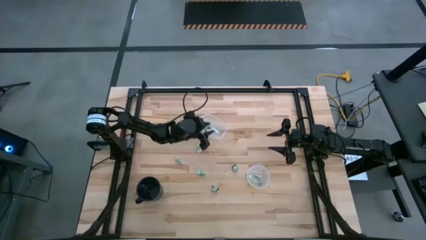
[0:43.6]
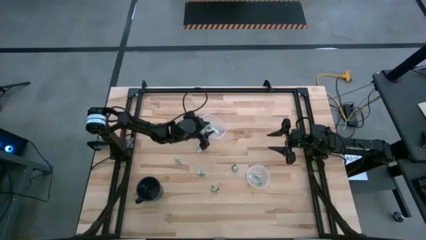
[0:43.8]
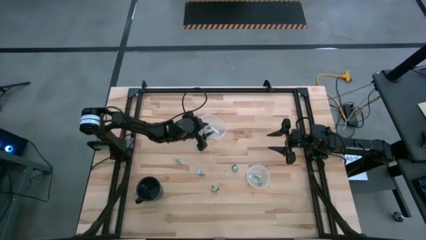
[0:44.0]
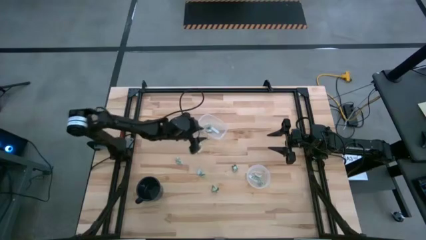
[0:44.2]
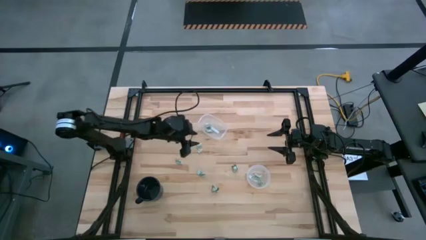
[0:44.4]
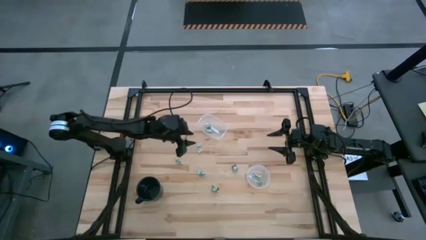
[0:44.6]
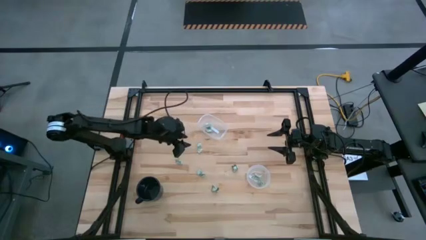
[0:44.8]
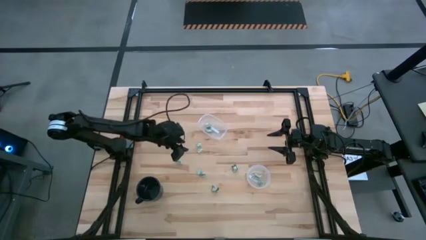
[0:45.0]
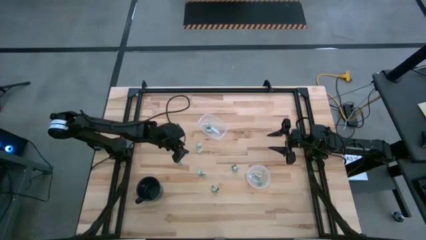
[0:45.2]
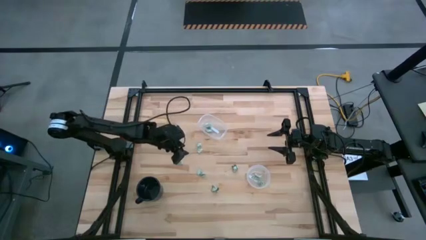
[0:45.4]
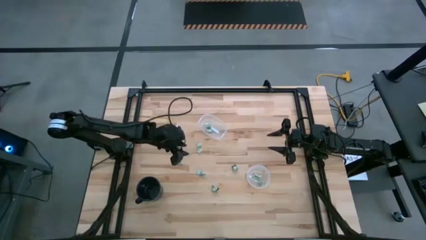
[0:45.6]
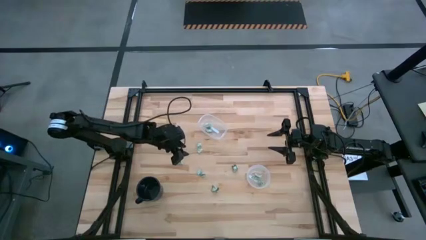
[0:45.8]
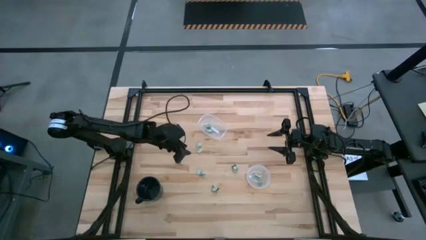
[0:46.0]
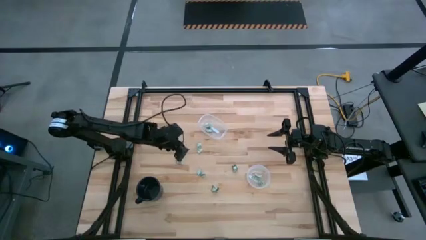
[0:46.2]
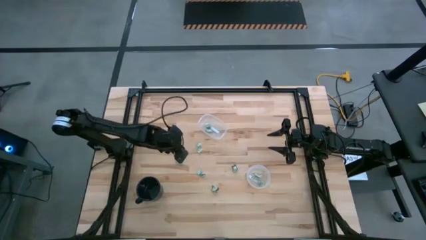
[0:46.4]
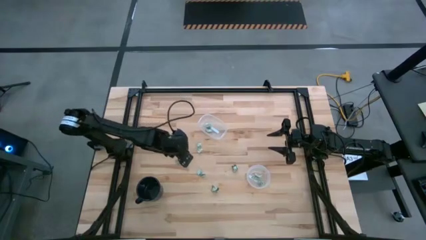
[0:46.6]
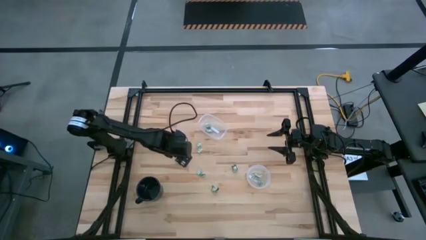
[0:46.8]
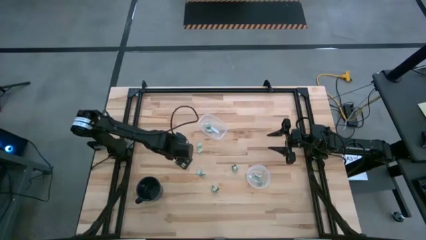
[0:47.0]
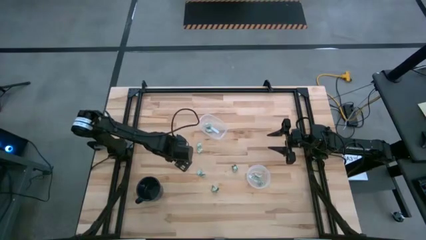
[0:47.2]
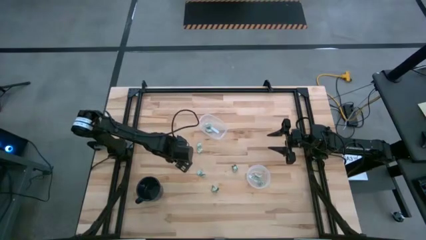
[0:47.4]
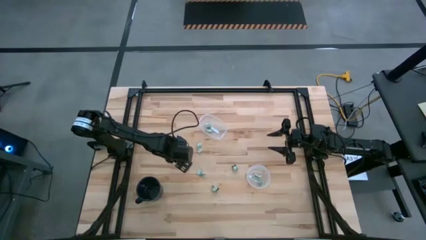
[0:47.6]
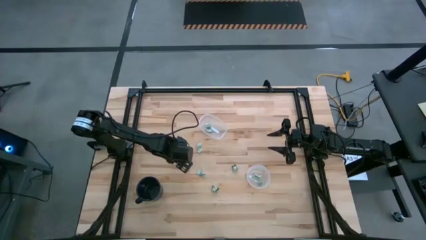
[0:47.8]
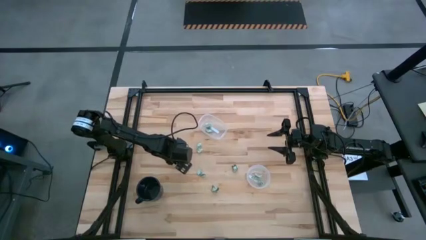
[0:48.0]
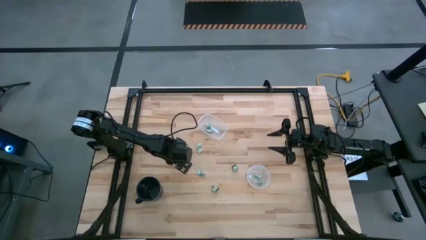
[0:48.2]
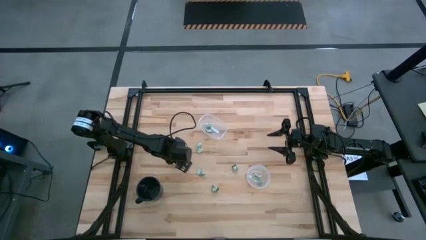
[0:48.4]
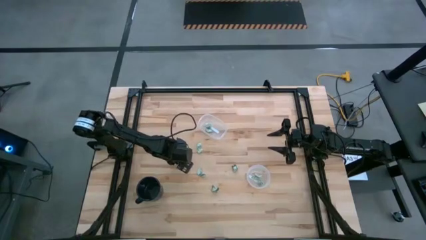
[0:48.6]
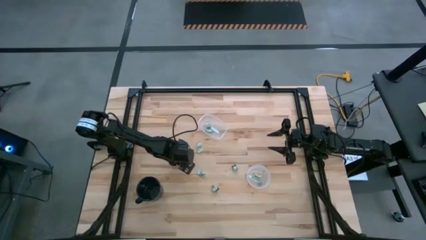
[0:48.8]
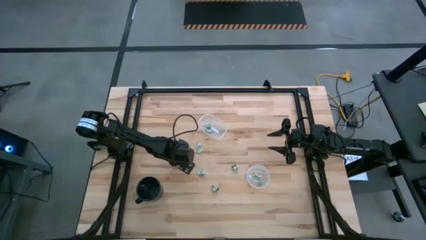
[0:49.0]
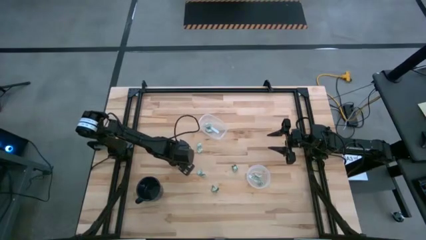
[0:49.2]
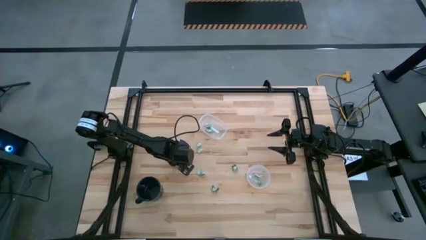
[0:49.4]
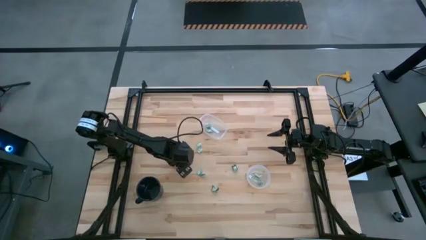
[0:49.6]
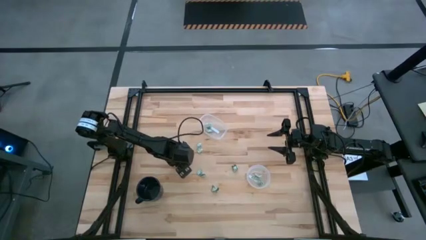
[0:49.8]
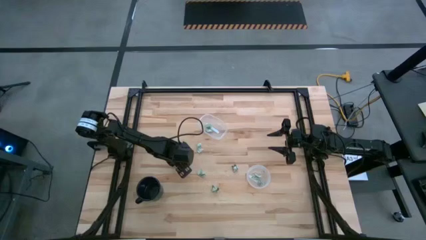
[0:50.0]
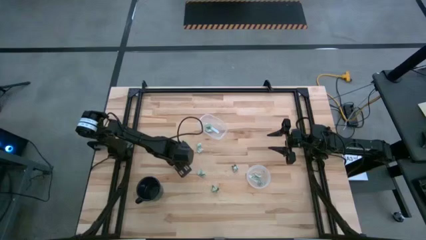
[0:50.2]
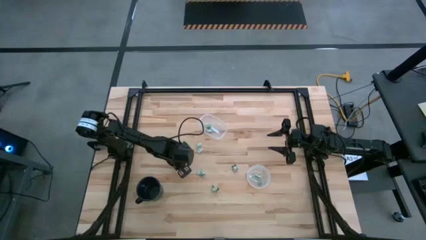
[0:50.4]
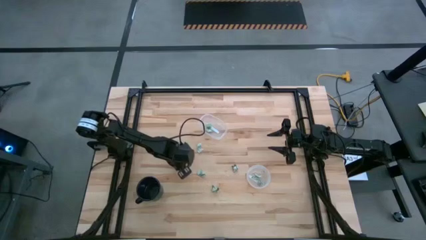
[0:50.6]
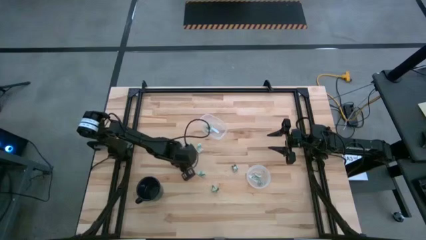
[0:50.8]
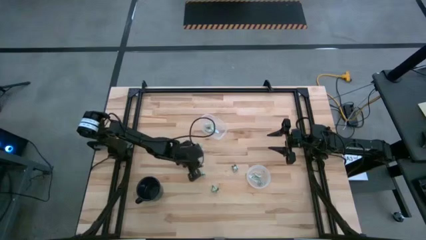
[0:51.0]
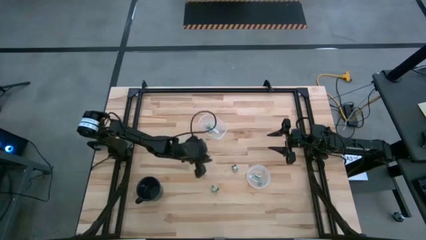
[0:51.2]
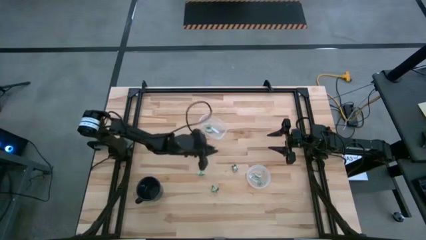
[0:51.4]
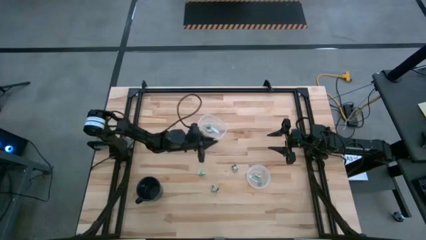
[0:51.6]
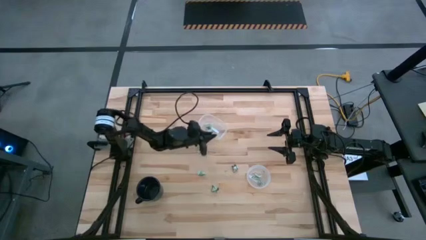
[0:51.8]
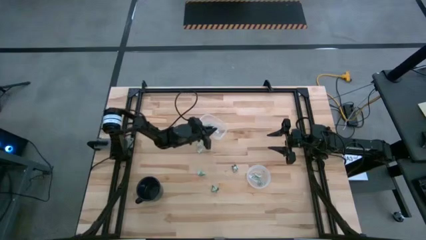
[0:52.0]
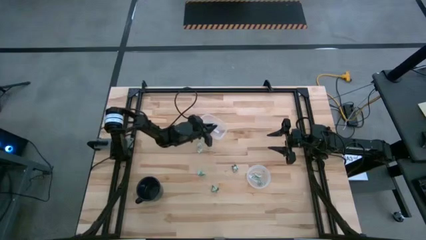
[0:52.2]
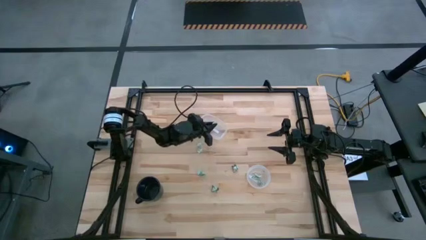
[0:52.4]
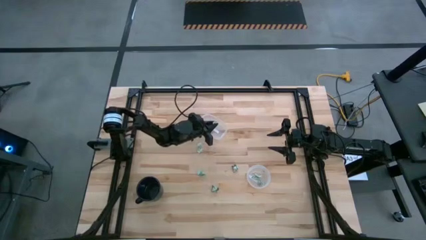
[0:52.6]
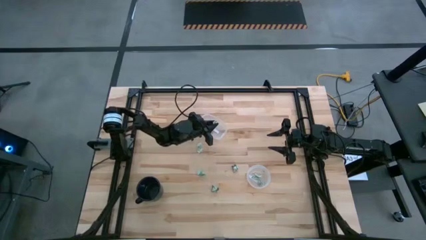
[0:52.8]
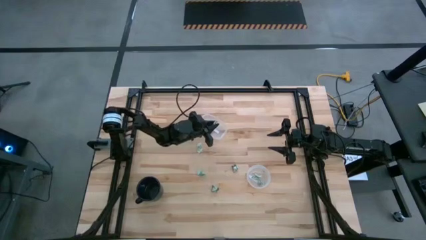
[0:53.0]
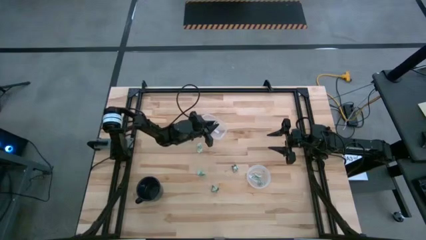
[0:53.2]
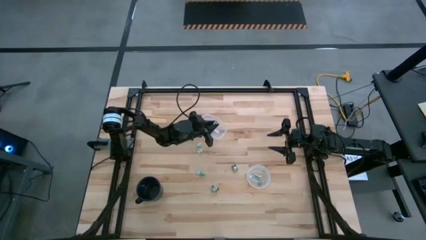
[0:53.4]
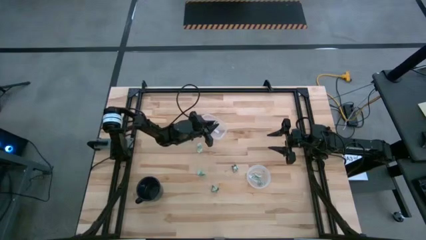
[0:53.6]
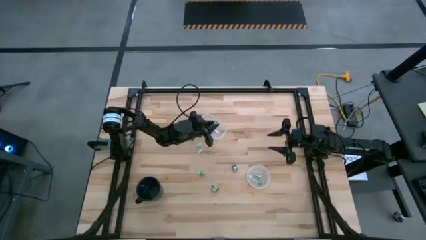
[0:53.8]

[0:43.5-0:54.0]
Task: Pick and place Stevia / Truvia into bins
Put the stevia packet into the oval transparent container

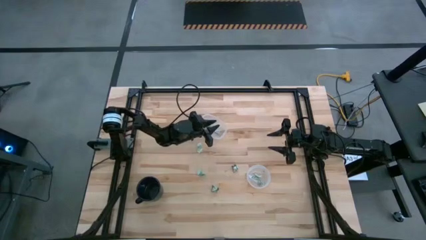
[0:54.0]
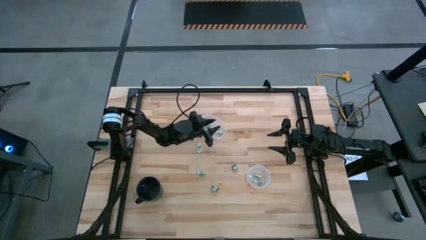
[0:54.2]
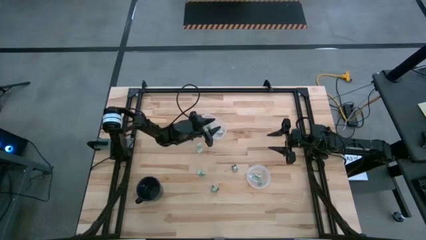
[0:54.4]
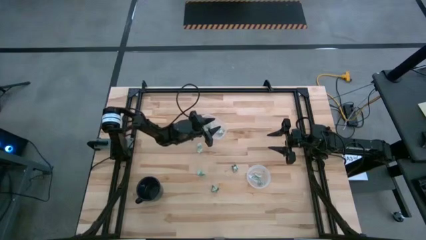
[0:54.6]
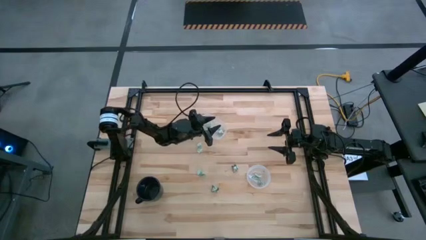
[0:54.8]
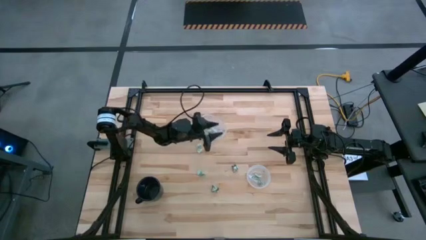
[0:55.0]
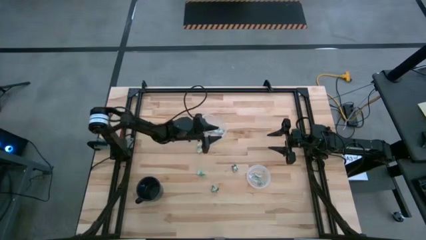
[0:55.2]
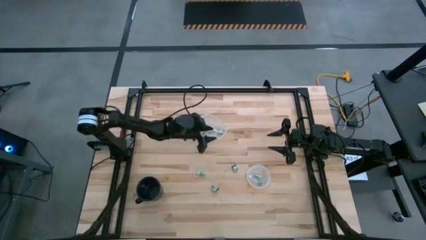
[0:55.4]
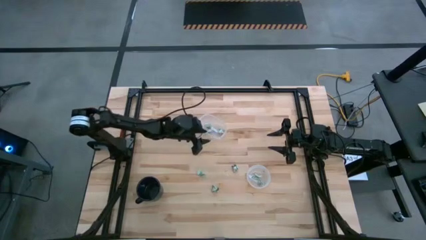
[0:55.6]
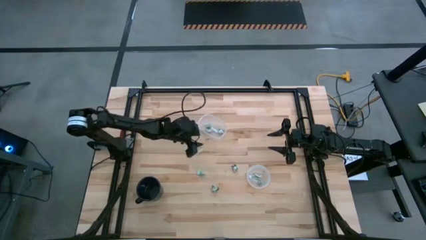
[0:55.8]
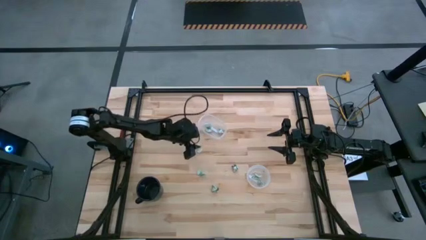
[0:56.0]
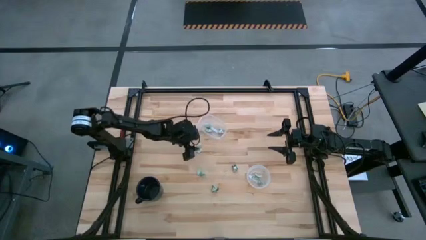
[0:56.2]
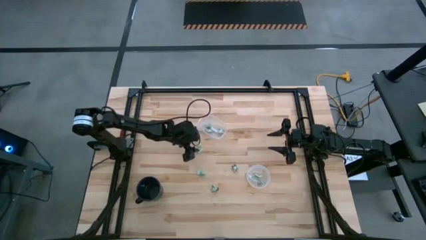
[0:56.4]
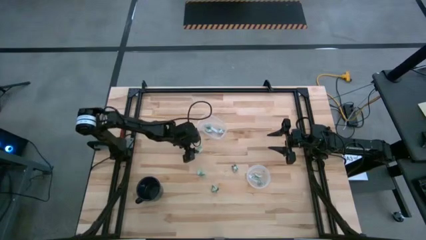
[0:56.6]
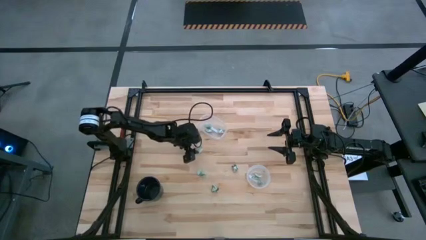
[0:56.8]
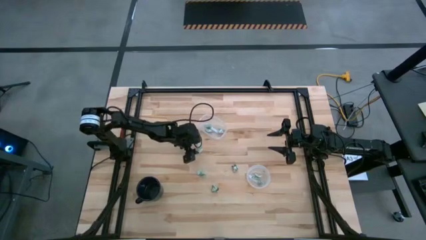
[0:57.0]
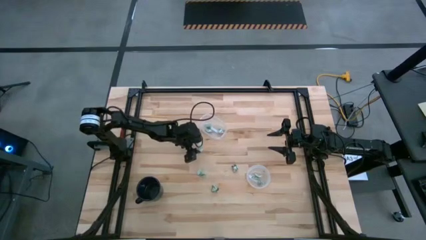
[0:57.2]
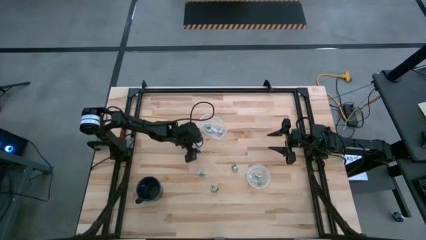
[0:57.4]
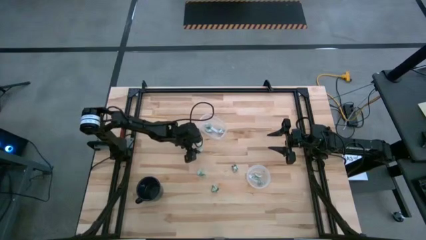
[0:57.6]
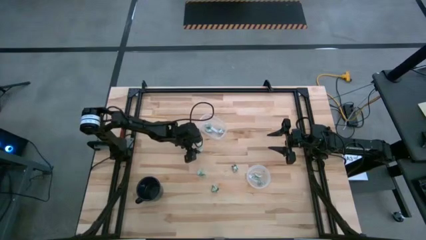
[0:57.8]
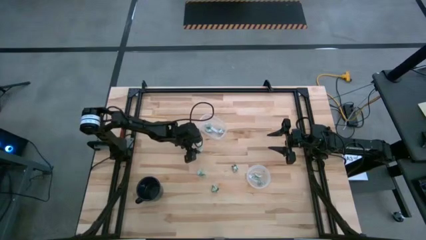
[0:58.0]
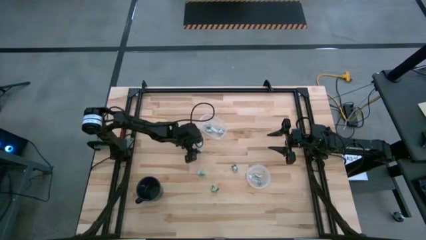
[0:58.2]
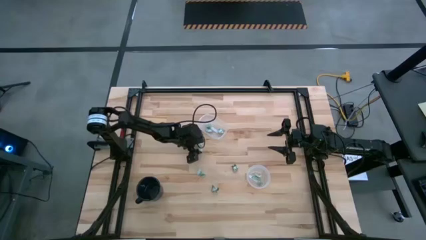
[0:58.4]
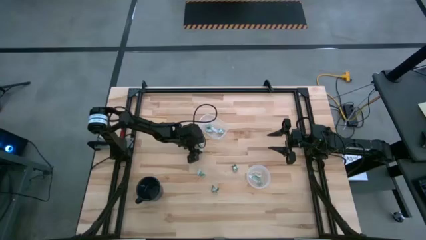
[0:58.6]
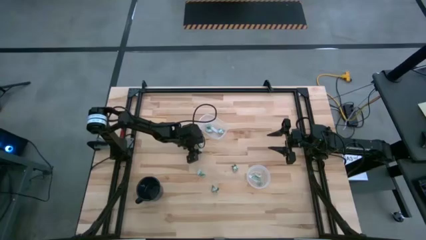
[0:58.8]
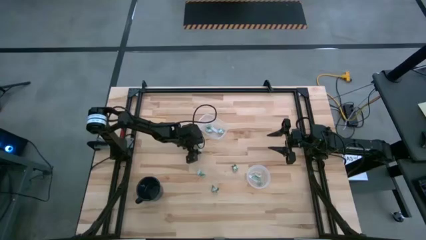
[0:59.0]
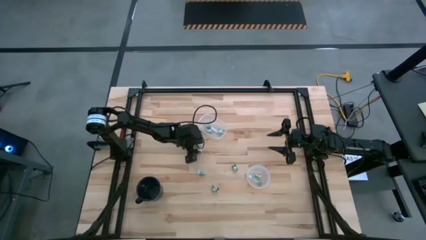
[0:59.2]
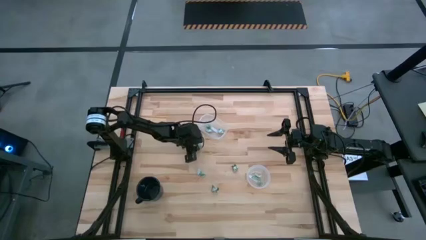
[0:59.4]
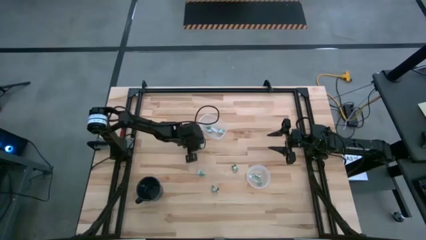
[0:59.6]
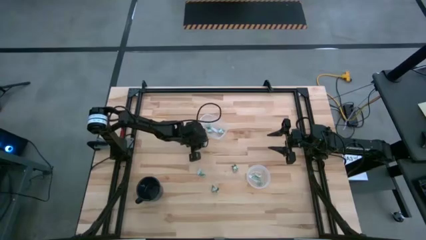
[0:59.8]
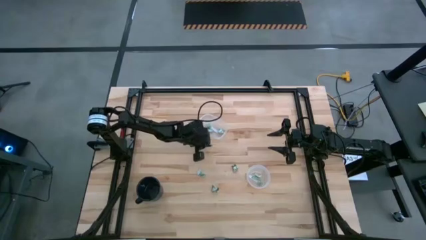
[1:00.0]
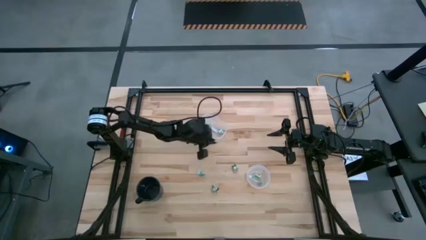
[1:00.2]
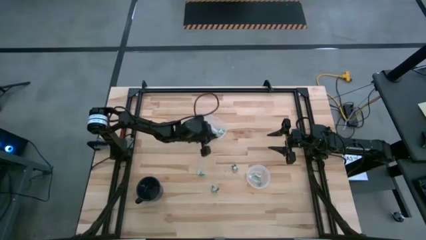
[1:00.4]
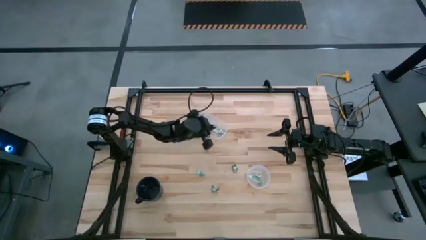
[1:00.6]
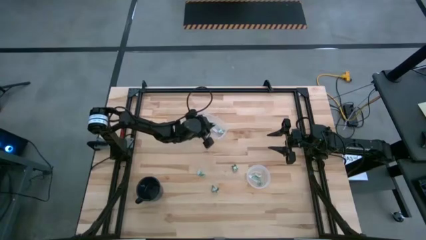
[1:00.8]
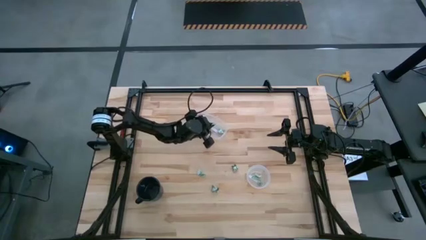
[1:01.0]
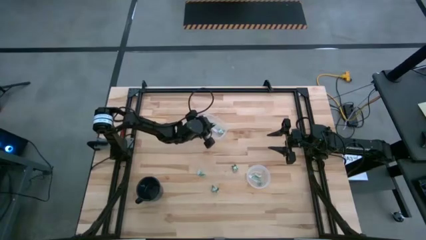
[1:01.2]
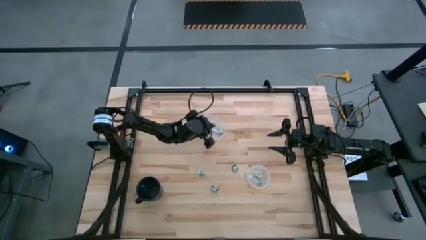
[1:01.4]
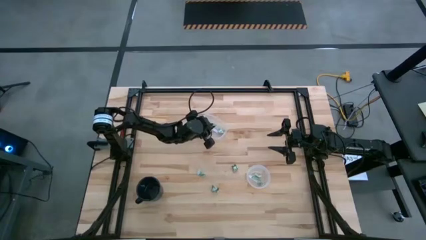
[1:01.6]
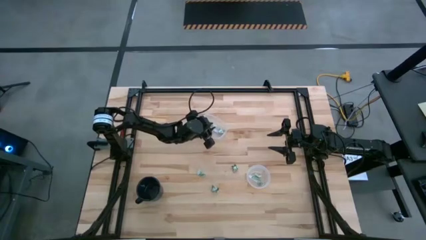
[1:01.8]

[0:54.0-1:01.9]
Put the stevia packet into the oval transparent container
